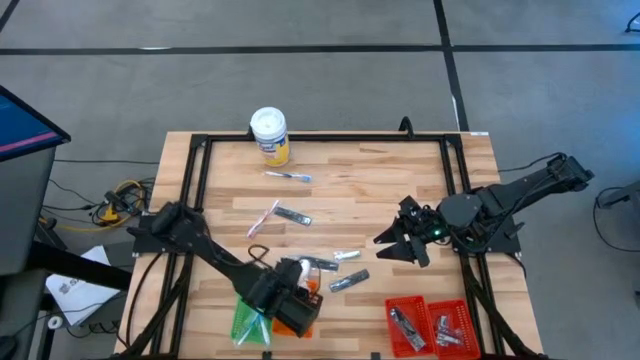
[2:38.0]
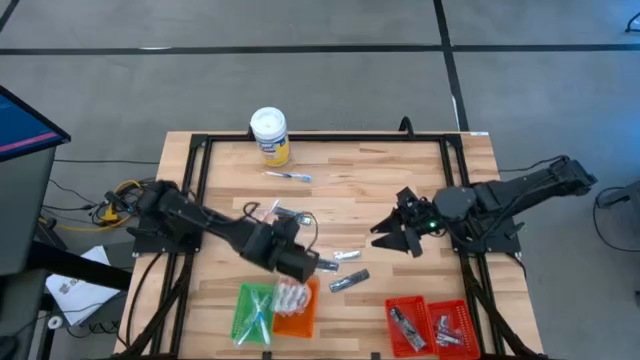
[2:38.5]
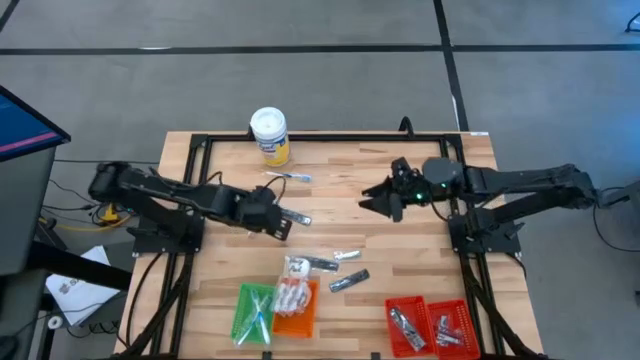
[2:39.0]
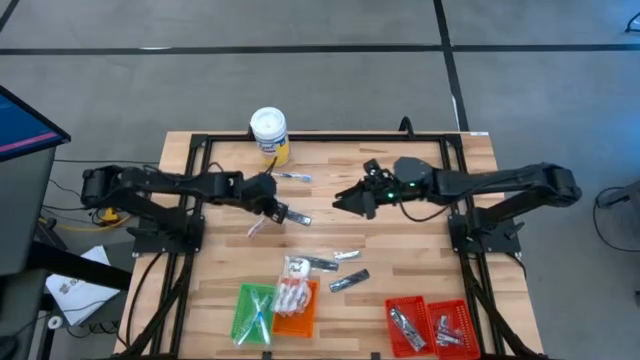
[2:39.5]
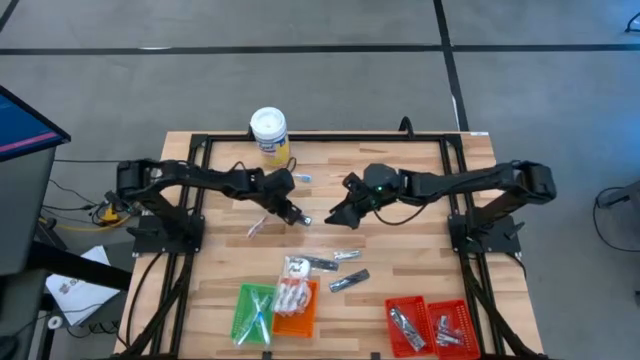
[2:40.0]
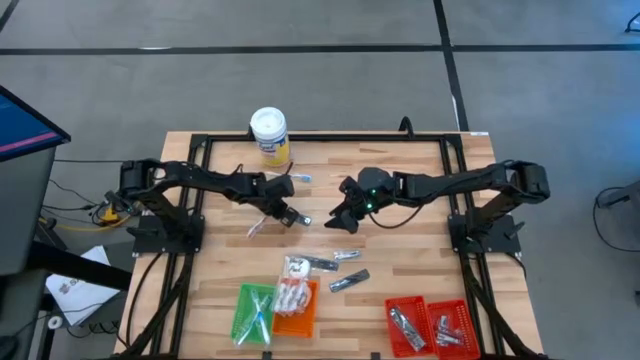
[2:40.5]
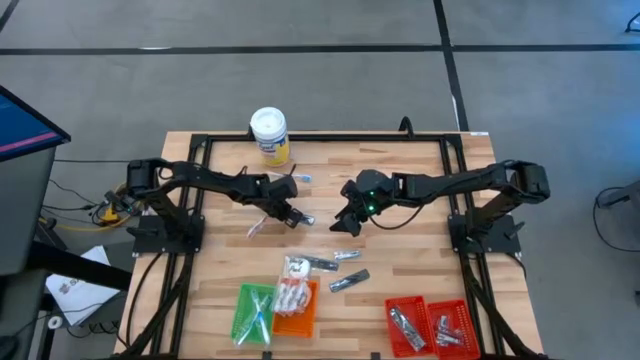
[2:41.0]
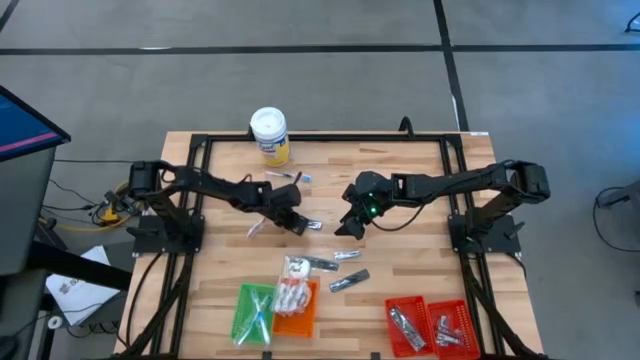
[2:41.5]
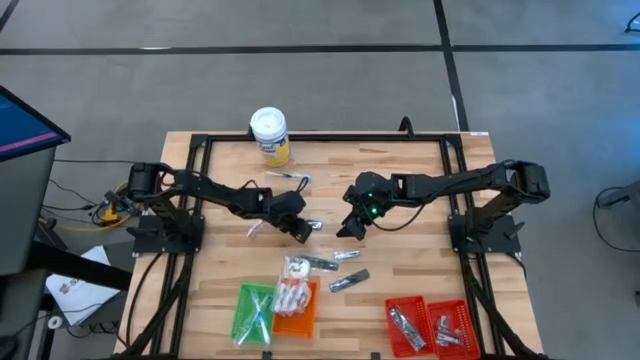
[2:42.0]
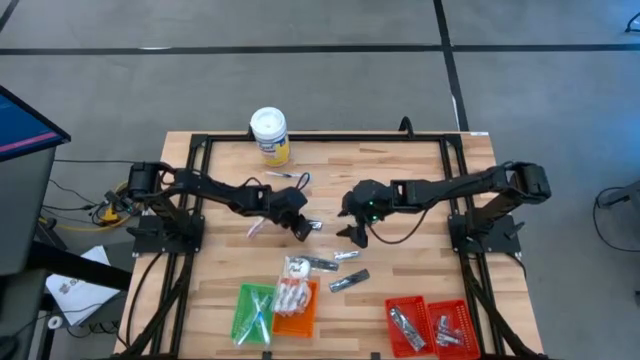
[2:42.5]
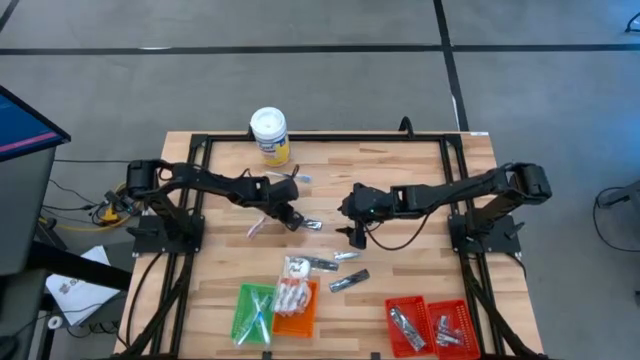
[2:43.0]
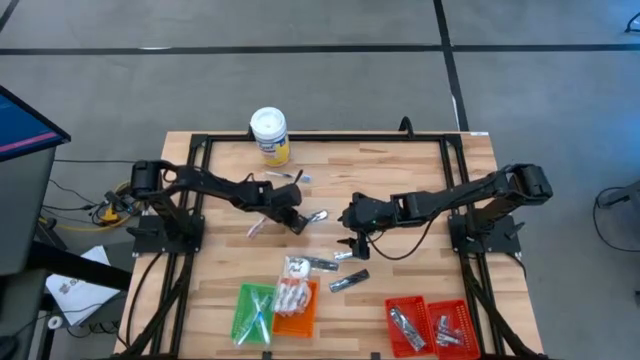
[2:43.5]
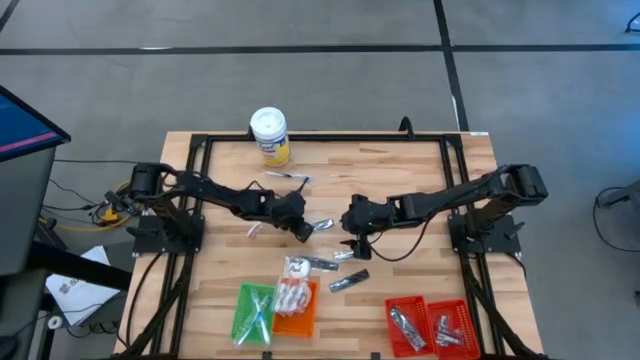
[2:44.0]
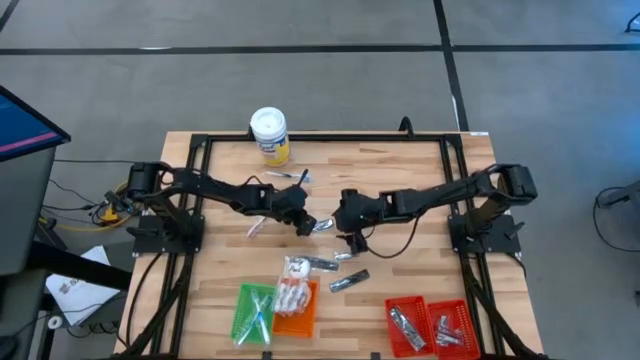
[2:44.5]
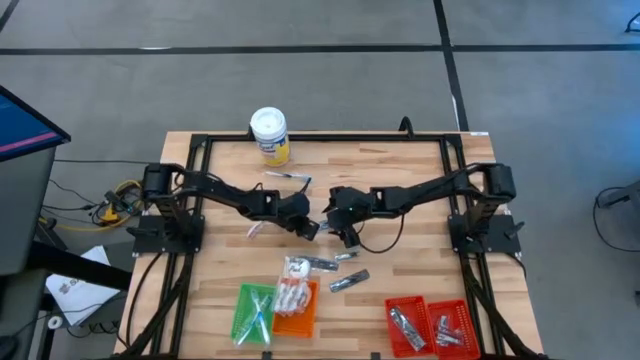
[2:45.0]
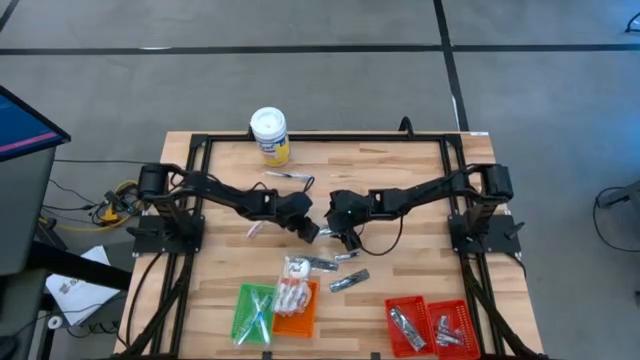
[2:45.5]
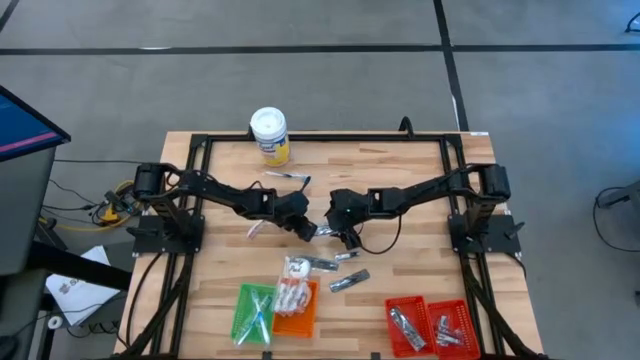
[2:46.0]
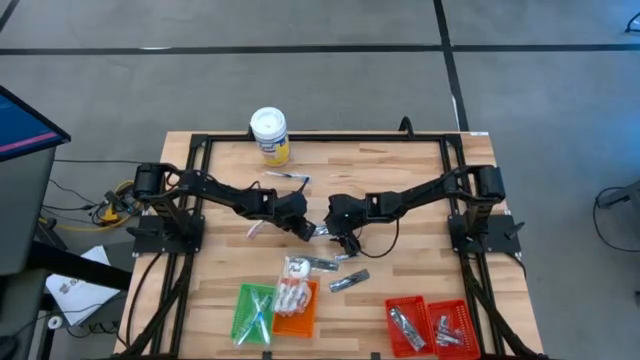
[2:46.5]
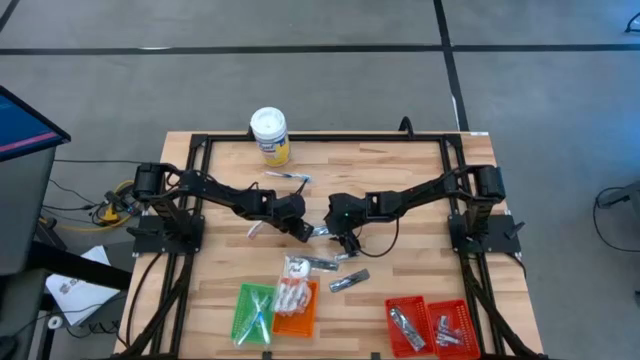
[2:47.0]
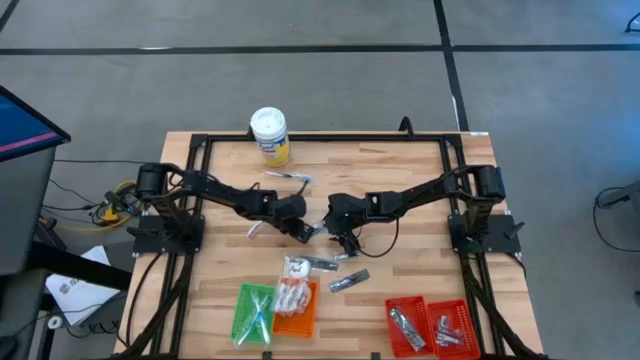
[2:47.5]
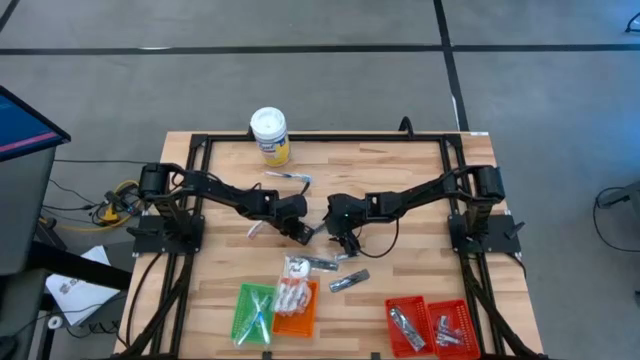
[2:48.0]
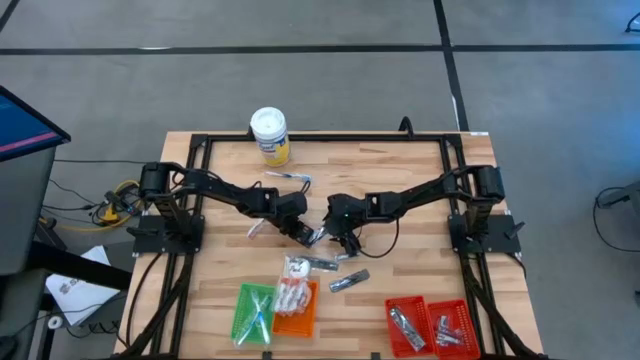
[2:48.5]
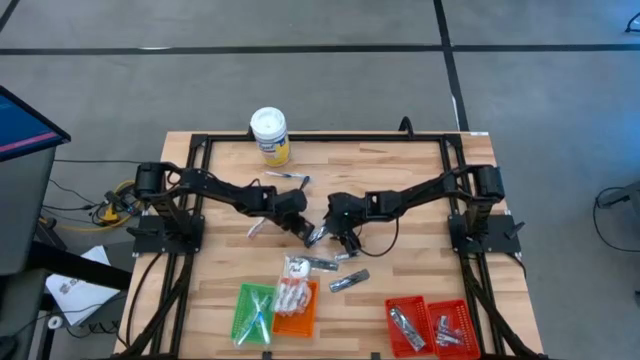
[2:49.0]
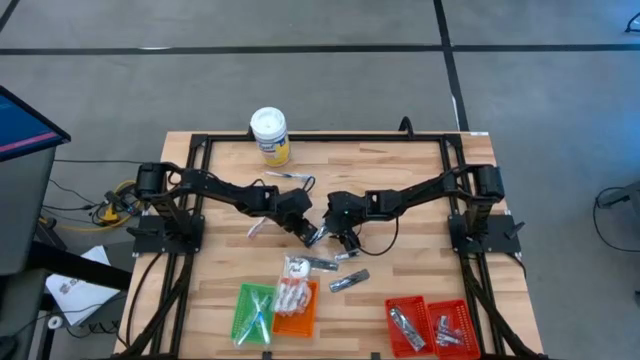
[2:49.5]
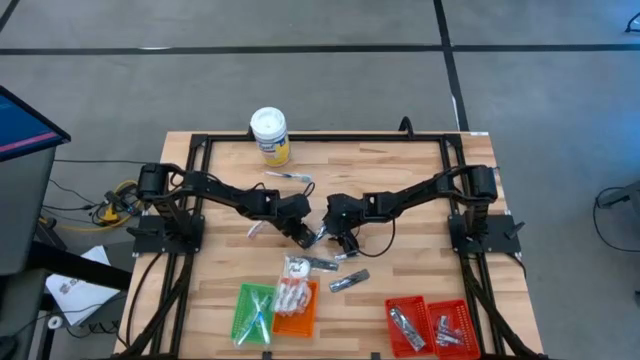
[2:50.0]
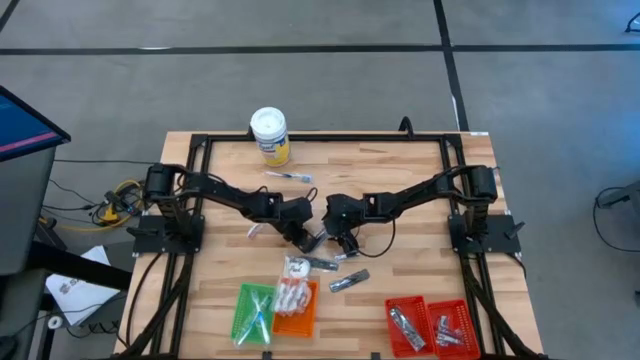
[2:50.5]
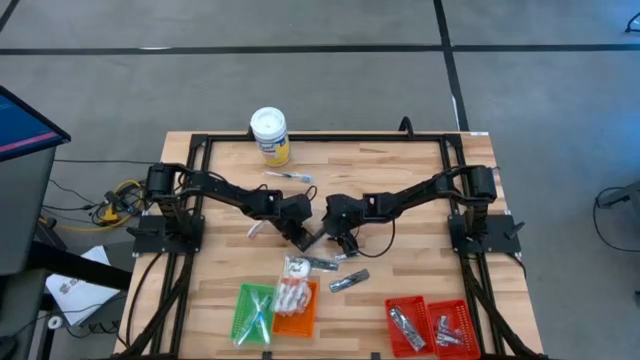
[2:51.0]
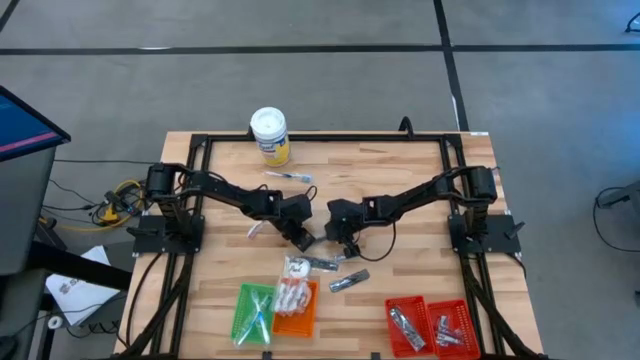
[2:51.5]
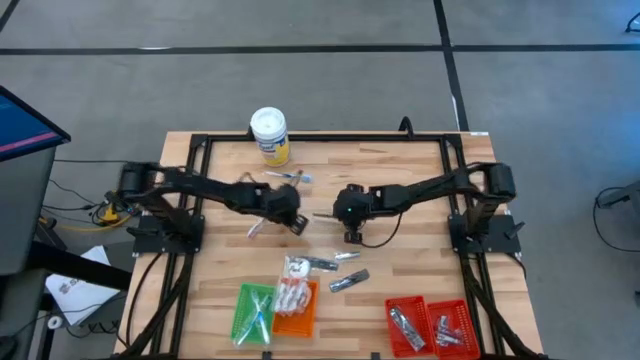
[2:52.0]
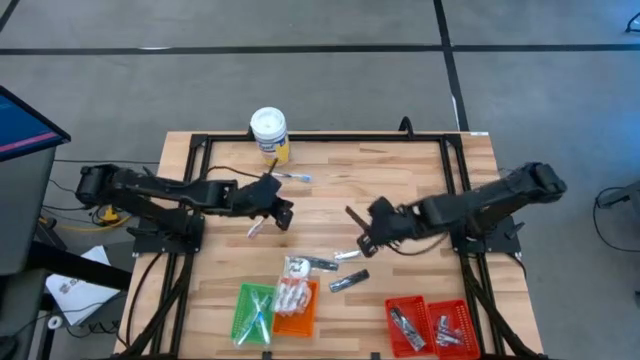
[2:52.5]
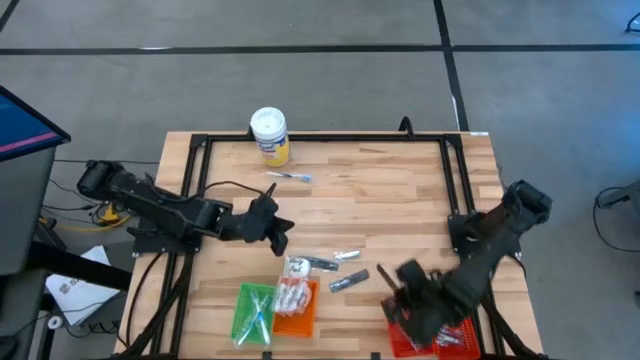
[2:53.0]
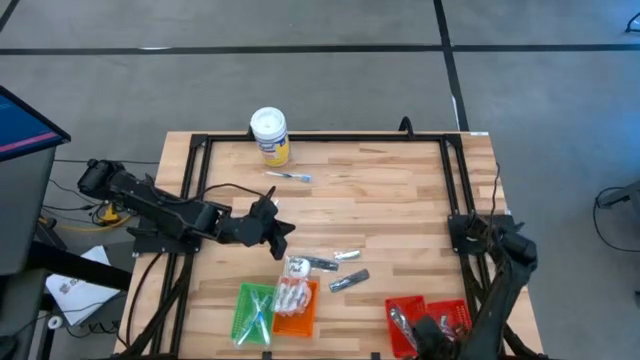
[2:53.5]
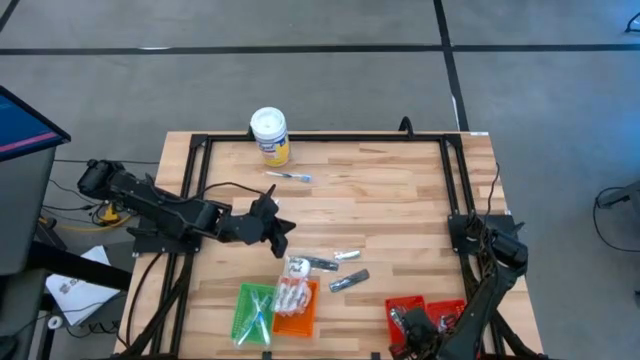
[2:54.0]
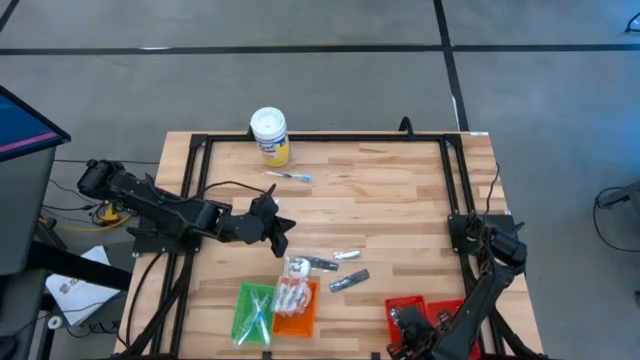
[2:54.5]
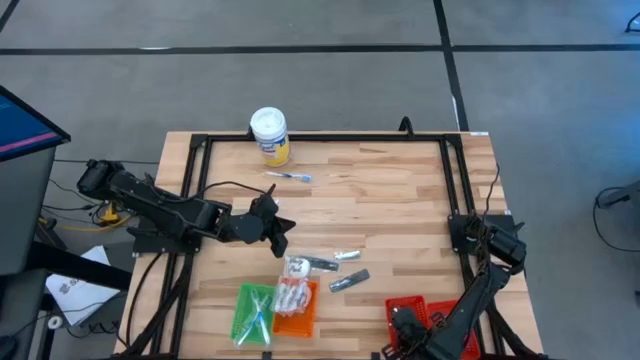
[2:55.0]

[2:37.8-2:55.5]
Task: Pick & Place Travel size toiletries
Put the black comb into the left red basket

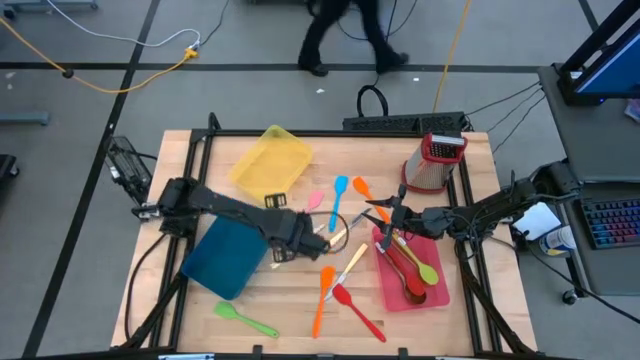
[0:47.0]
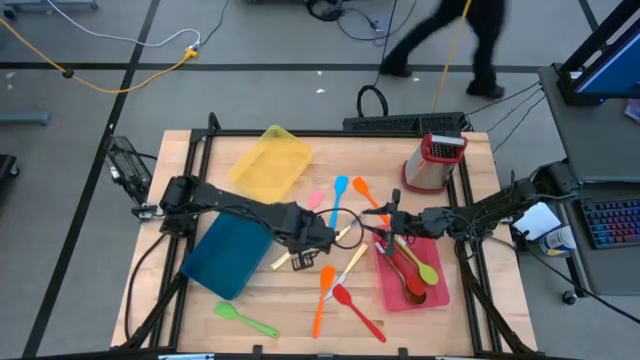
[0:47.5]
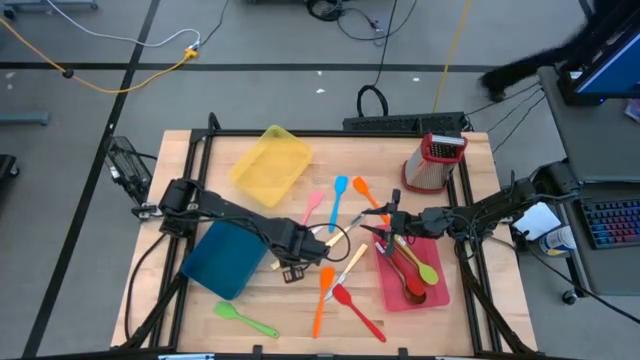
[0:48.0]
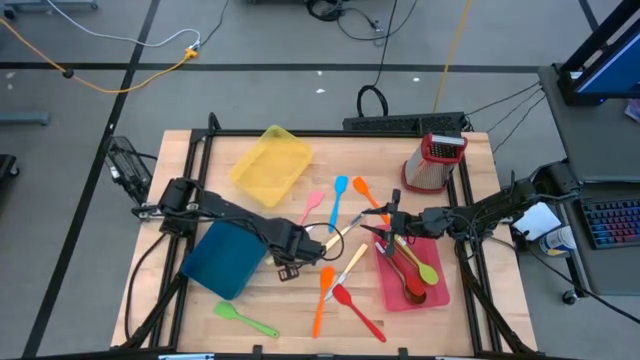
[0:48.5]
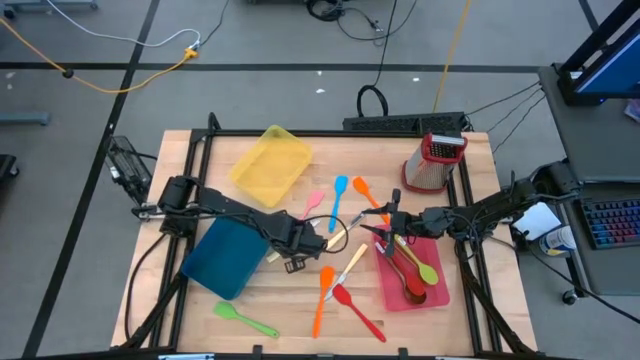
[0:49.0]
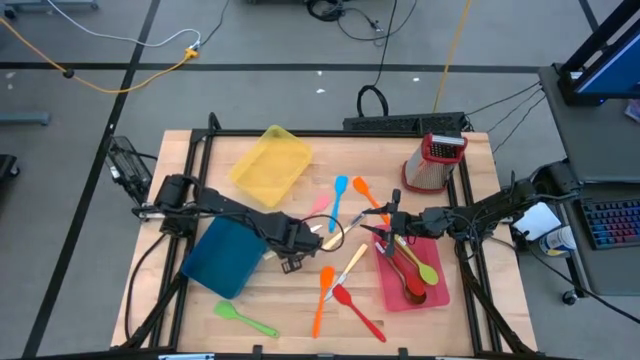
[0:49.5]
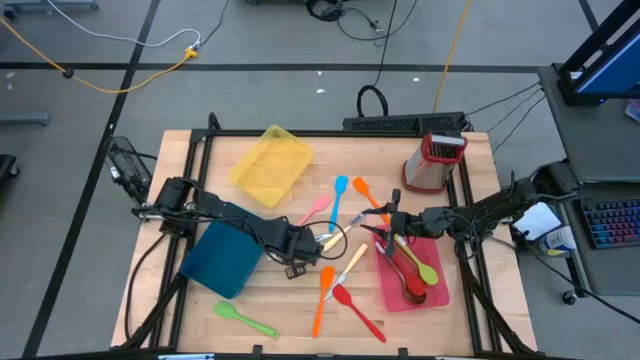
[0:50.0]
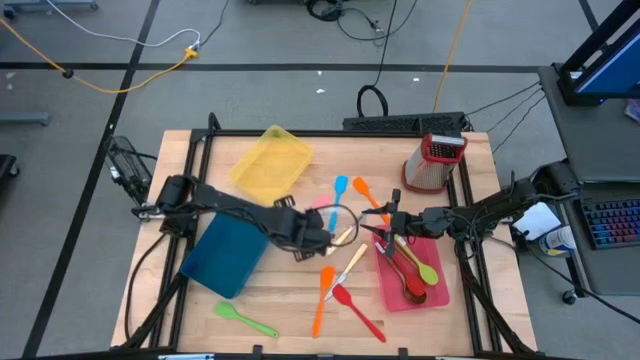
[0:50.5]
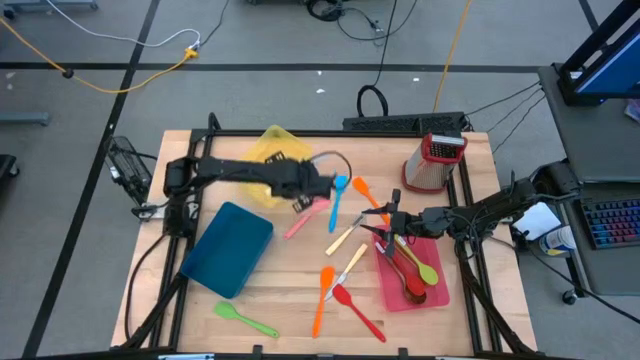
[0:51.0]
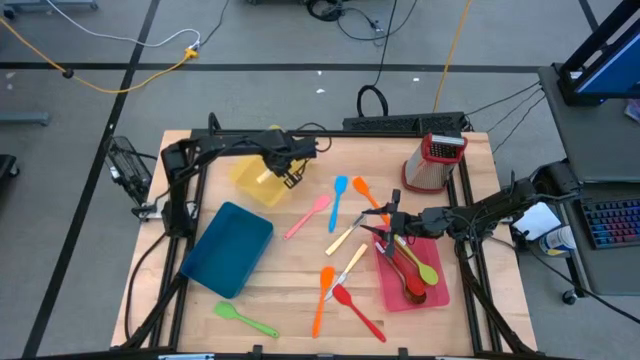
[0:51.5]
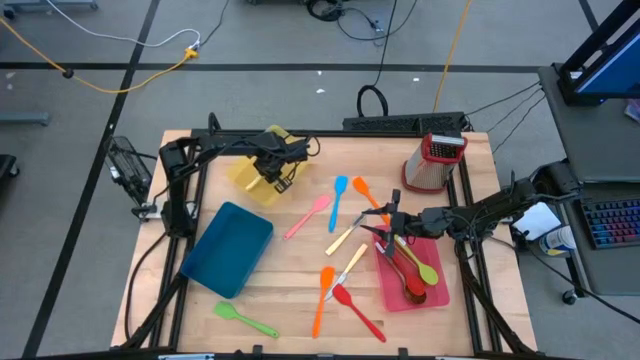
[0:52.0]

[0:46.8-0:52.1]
Task: Pick & Place Kitchen Items
Put the yellow knife into the yellow bin
